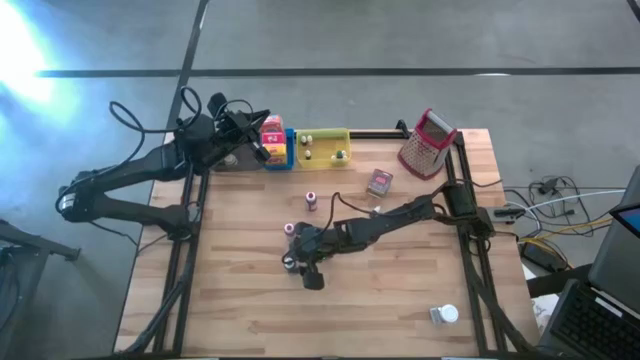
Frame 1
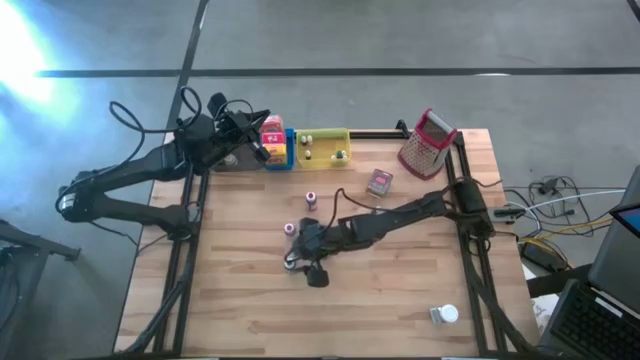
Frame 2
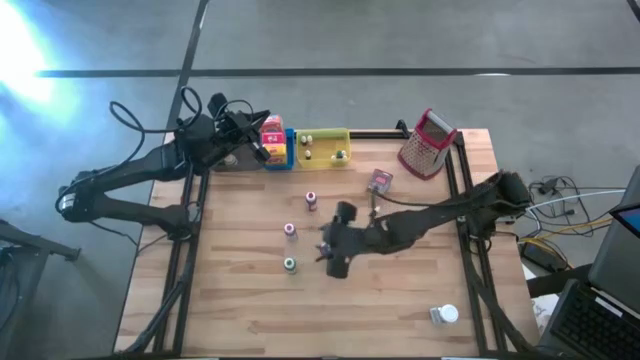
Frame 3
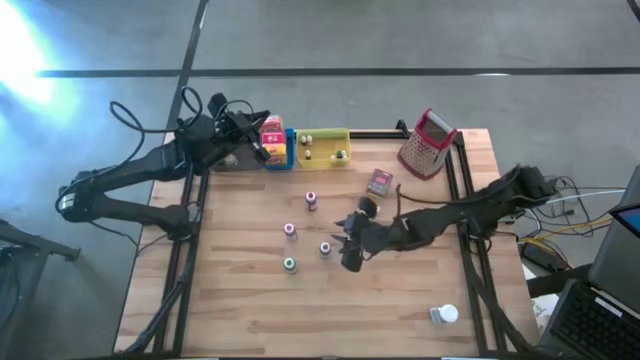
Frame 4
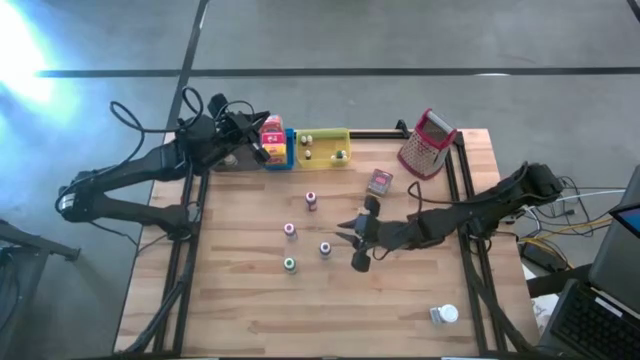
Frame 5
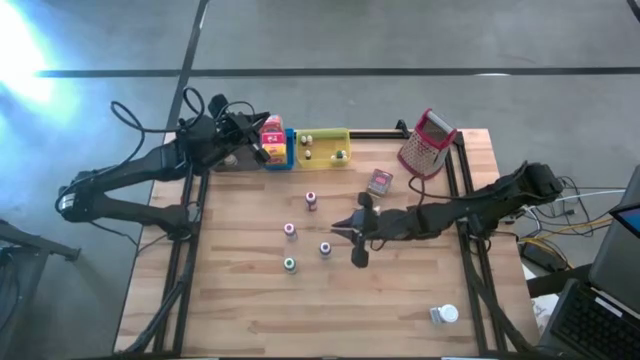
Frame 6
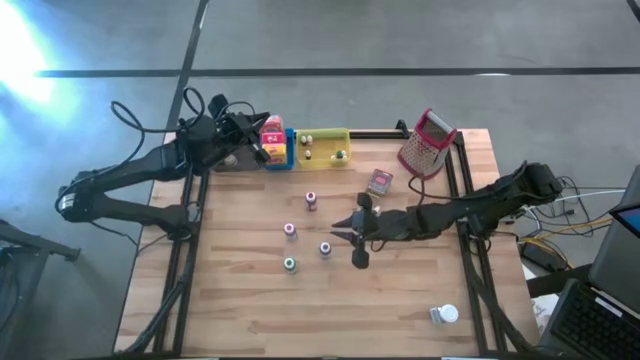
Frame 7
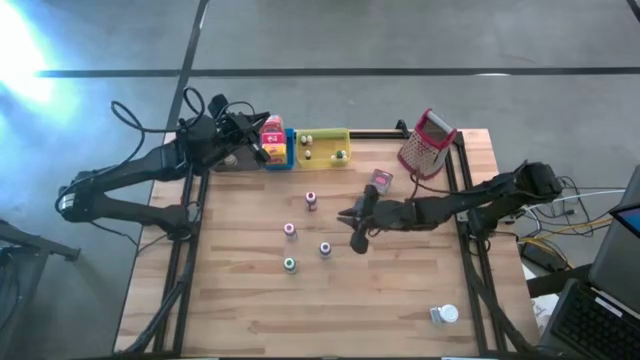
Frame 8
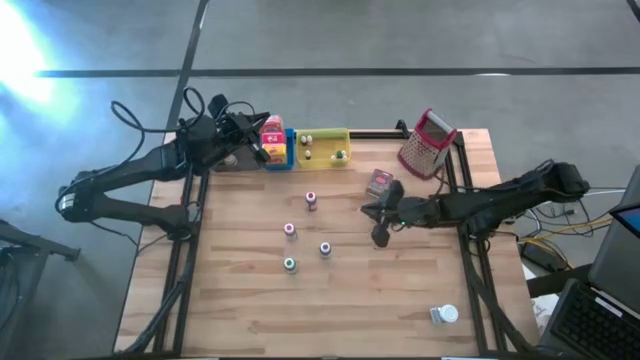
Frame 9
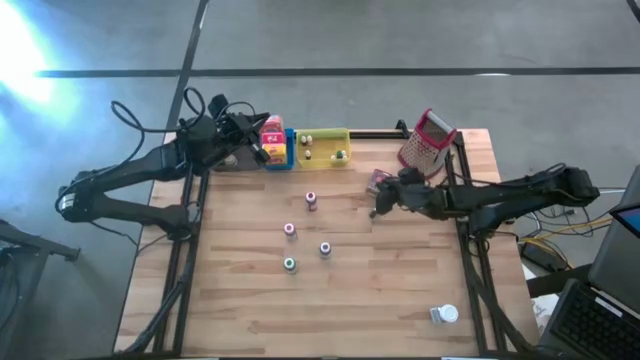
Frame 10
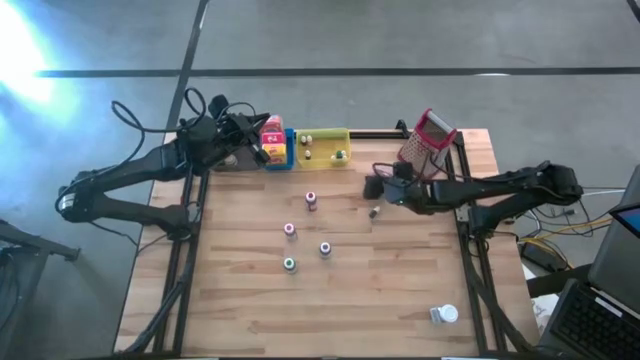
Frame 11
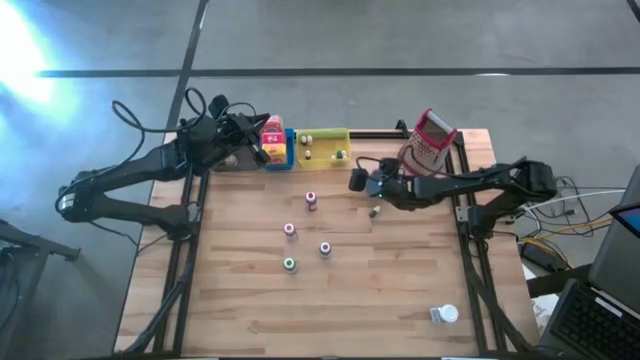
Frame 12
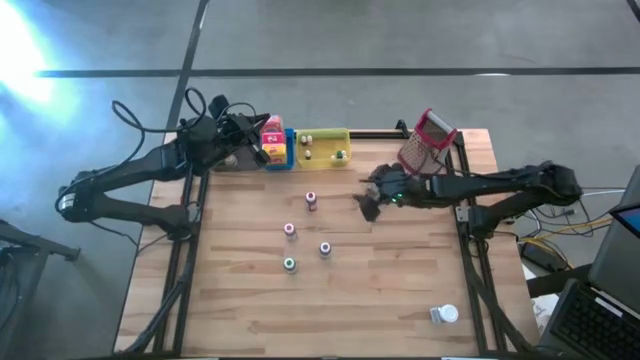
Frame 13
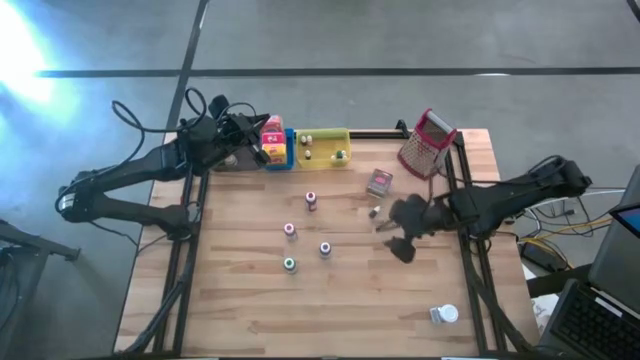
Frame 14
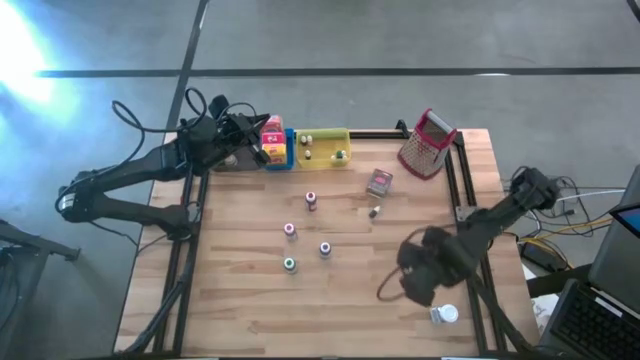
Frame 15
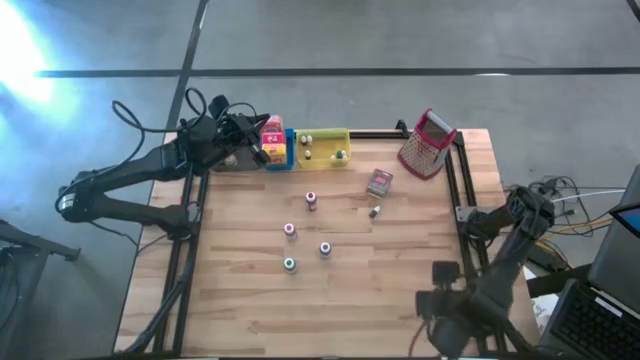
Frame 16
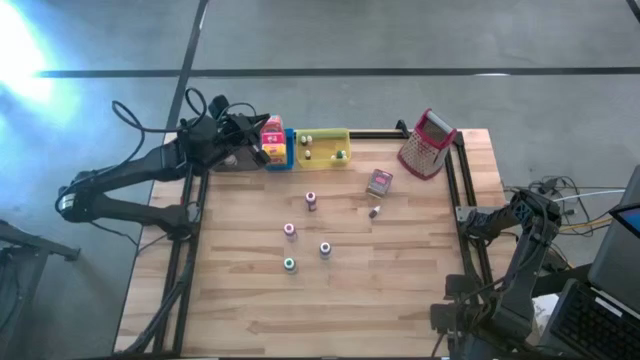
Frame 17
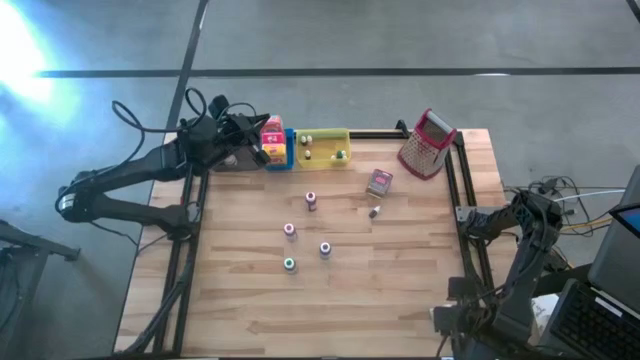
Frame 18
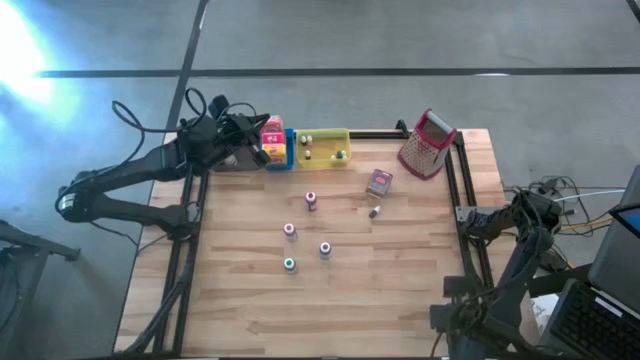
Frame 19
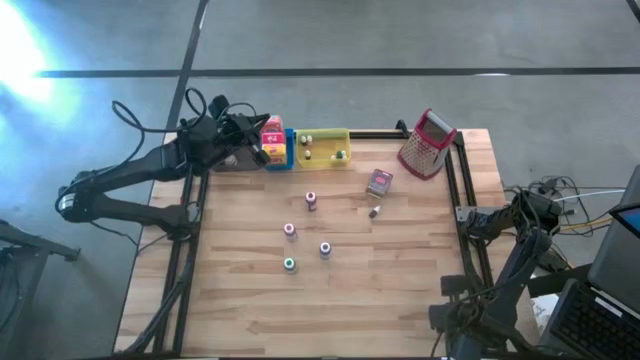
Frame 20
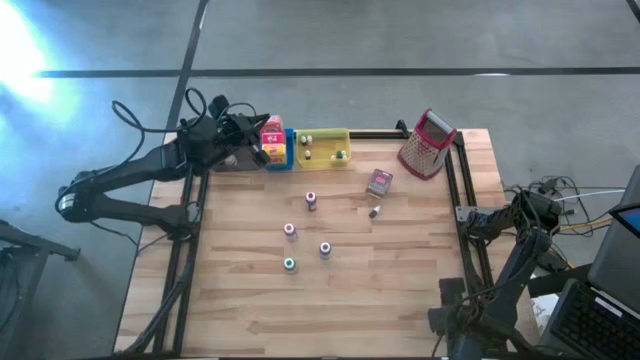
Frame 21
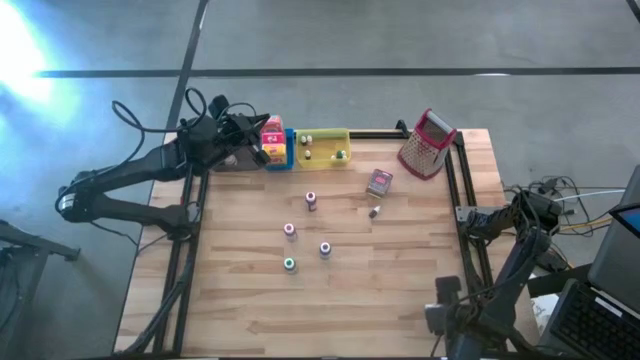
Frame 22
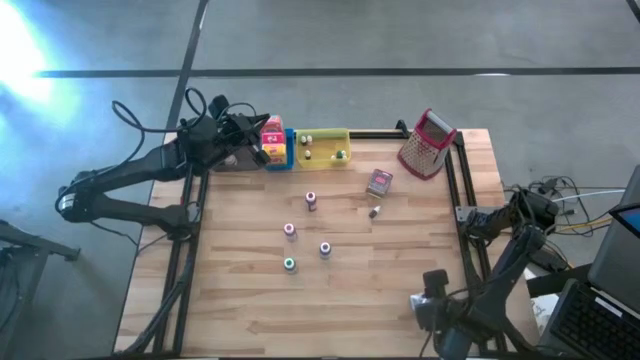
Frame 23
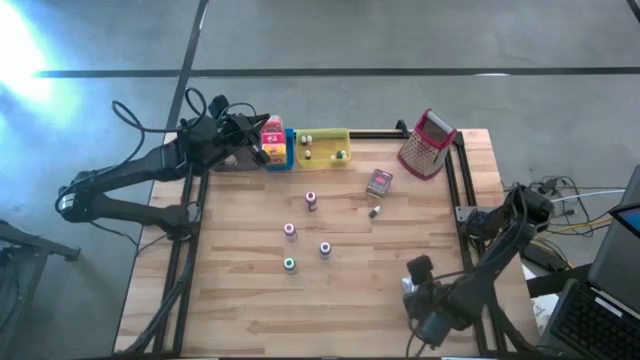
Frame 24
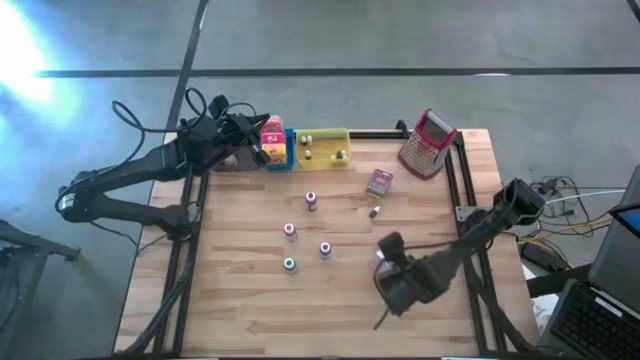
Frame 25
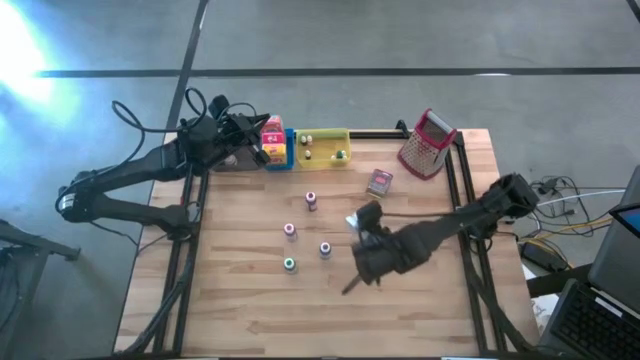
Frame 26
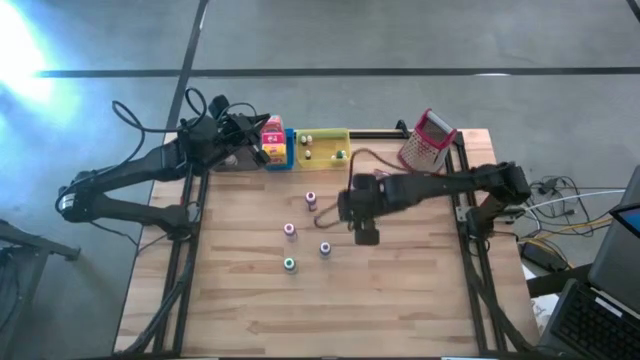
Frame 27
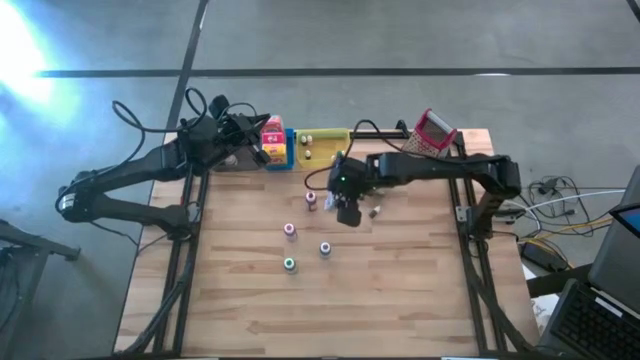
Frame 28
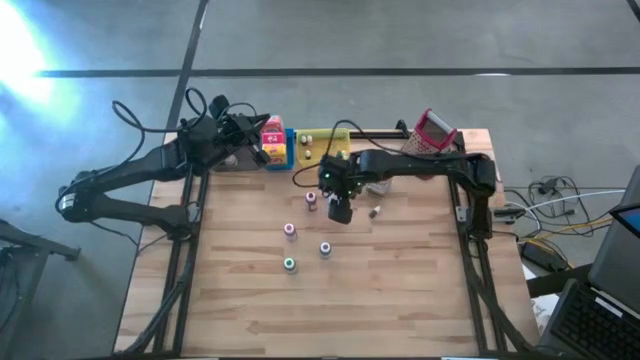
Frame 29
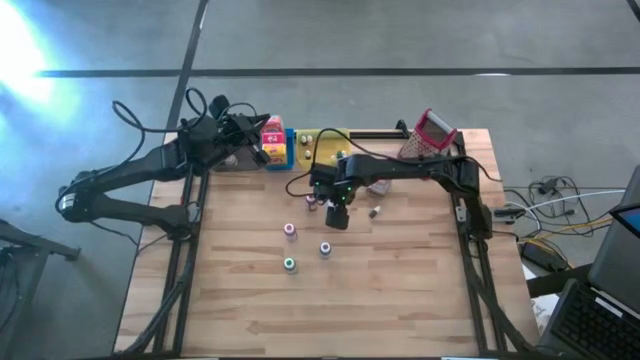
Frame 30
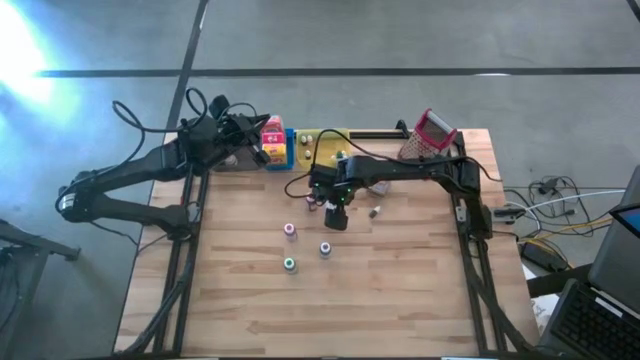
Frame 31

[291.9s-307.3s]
Task: Pick & Place Kitchen Items
Move the white seasoning bottle to the center of the table

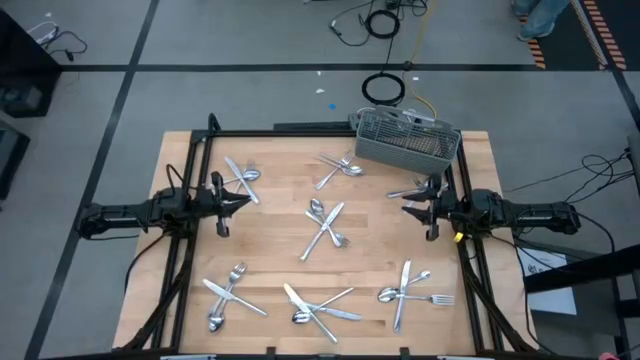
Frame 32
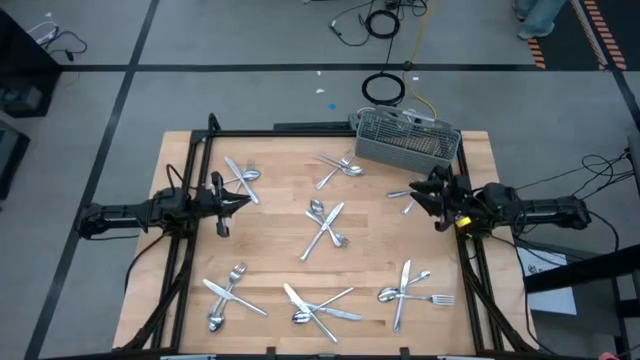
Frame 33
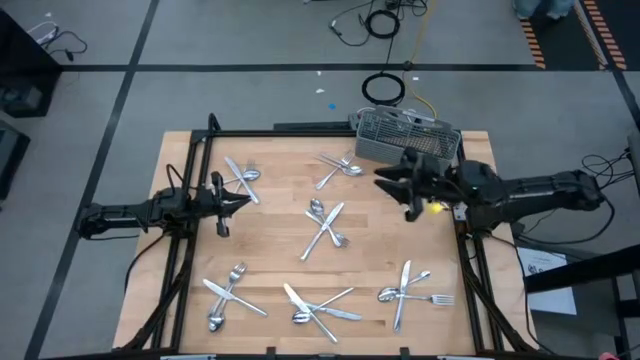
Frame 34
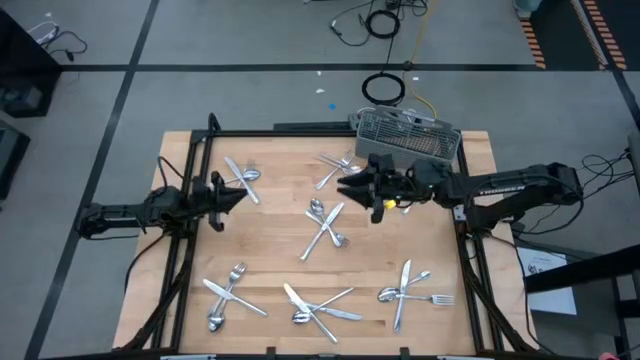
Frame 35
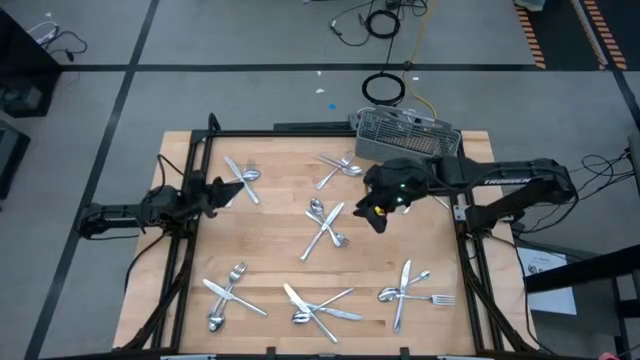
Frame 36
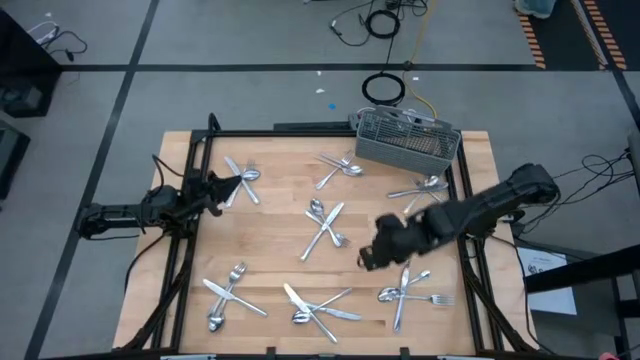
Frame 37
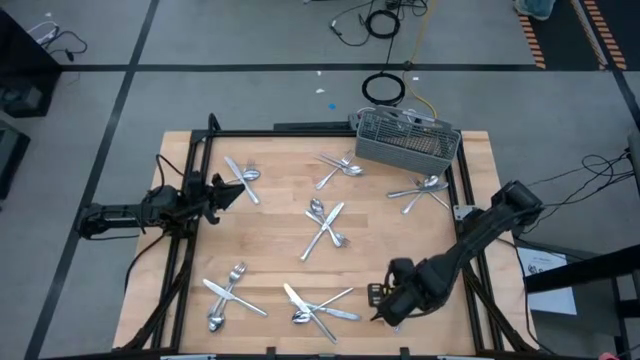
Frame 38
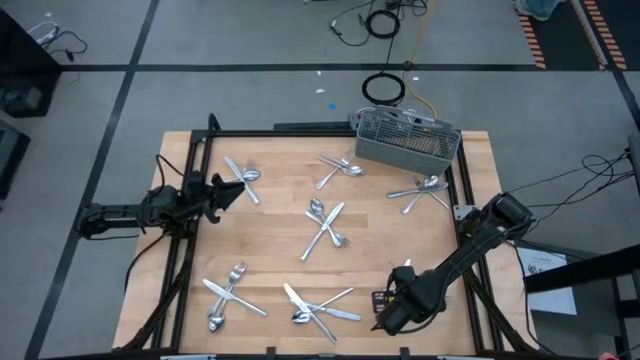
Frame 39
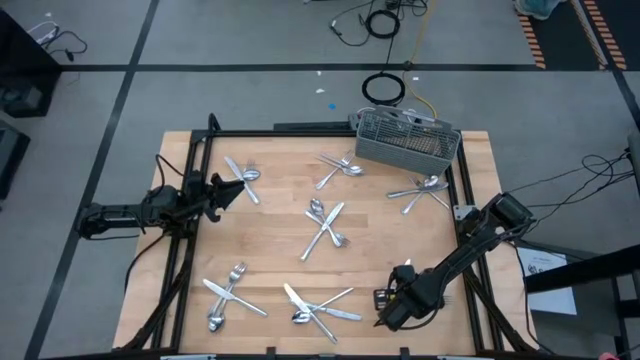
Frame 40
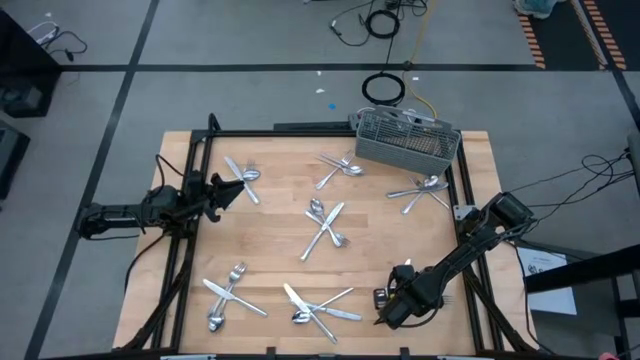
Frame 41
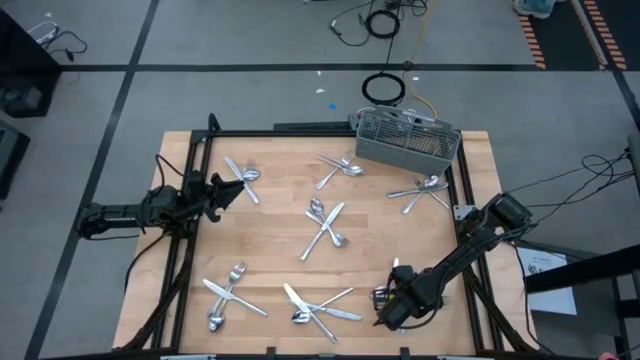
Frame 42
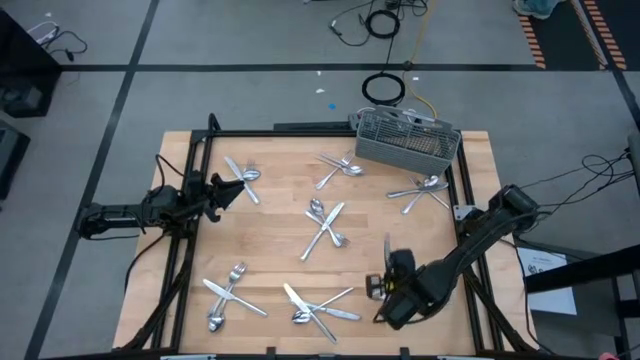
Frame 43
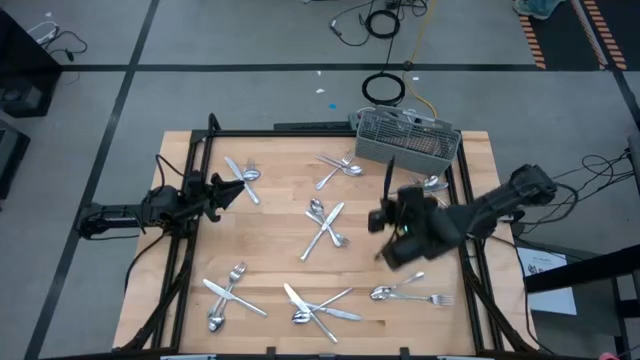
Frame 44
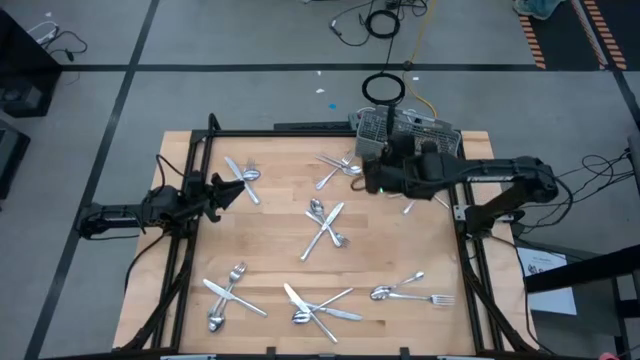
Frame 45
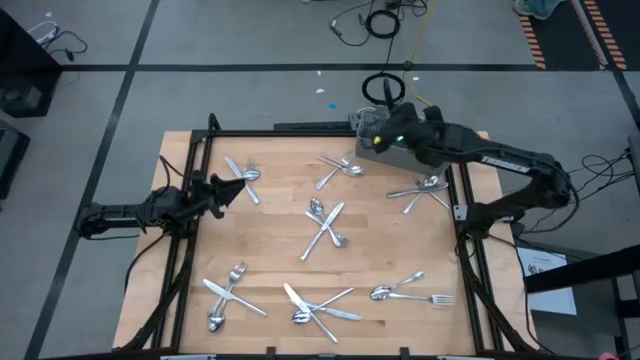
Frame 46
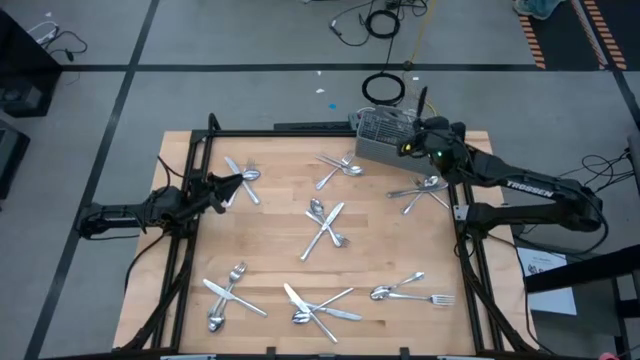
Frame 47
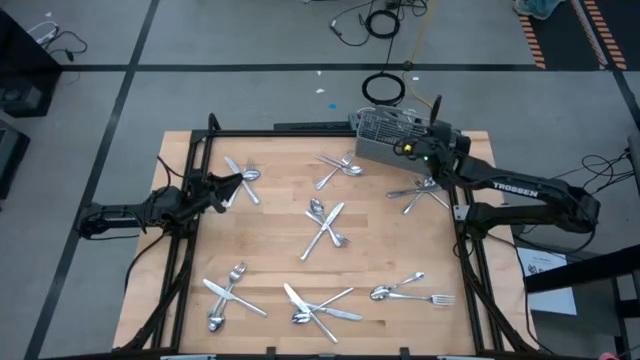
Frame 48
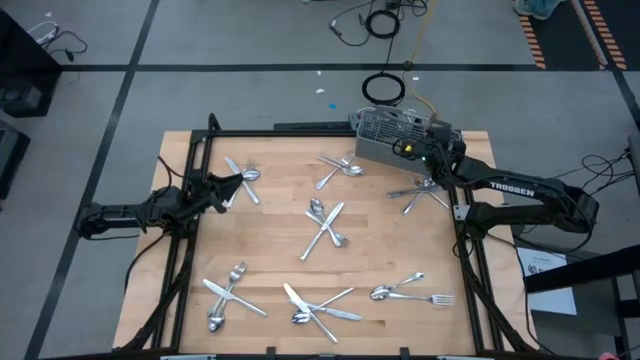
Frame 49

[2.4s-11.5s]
Task: Sort silverware
Put the silver table knife into the gray utensil holder
